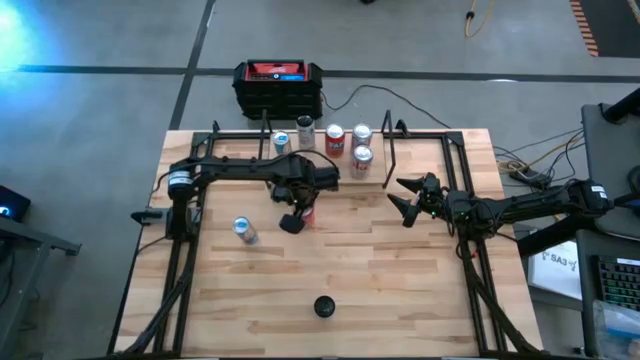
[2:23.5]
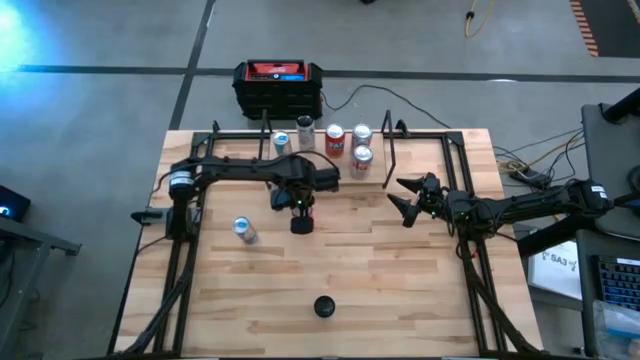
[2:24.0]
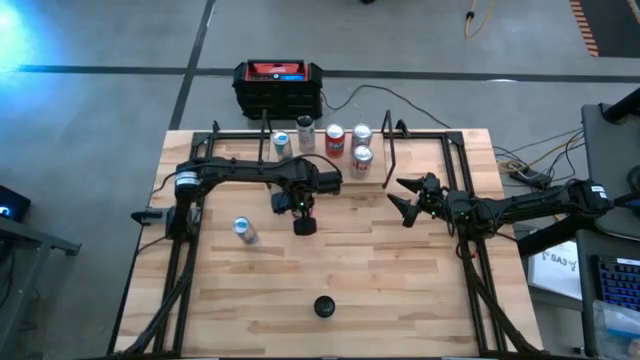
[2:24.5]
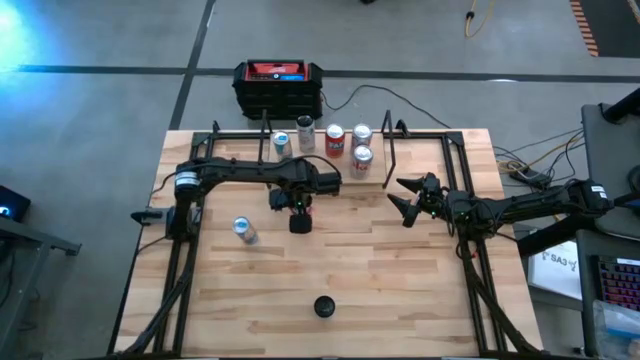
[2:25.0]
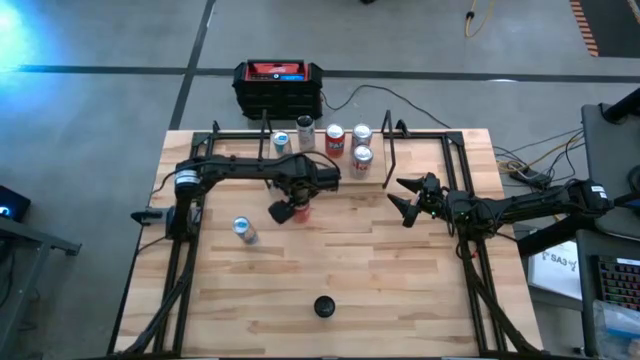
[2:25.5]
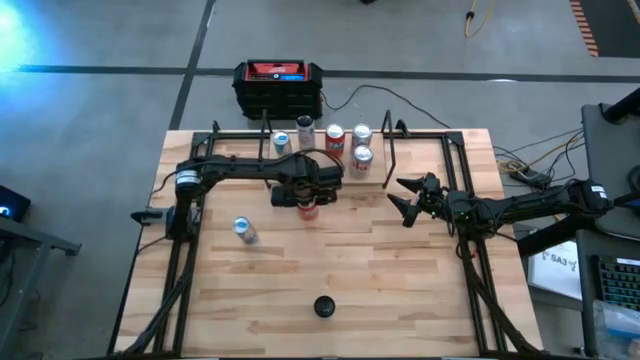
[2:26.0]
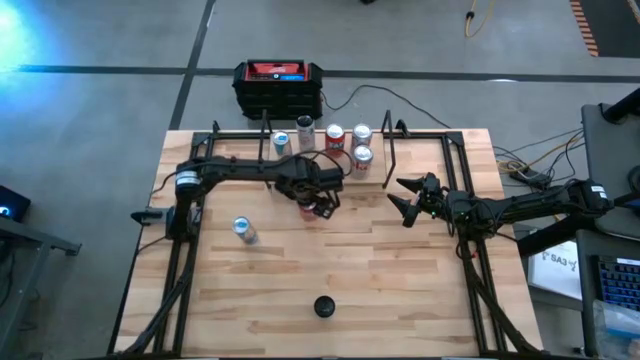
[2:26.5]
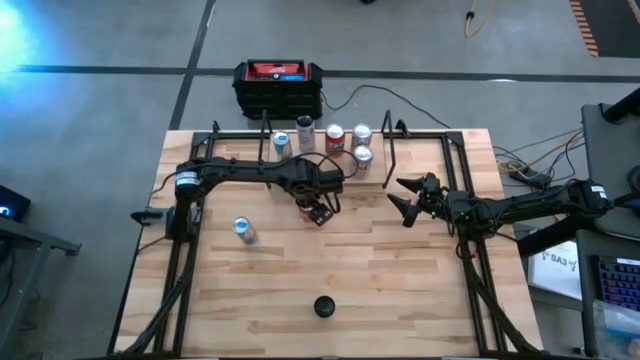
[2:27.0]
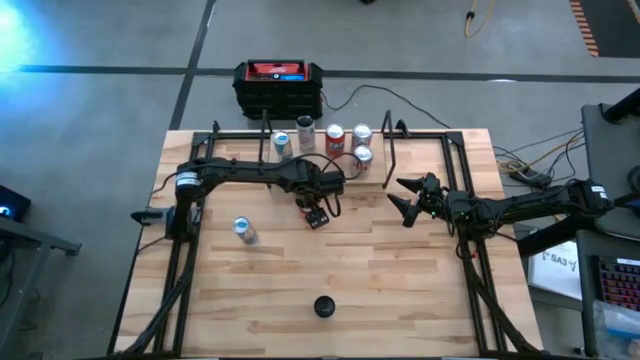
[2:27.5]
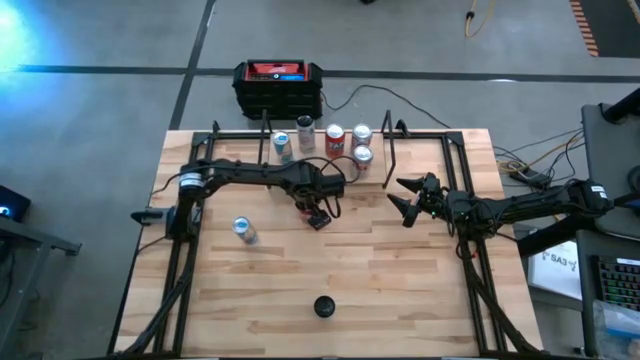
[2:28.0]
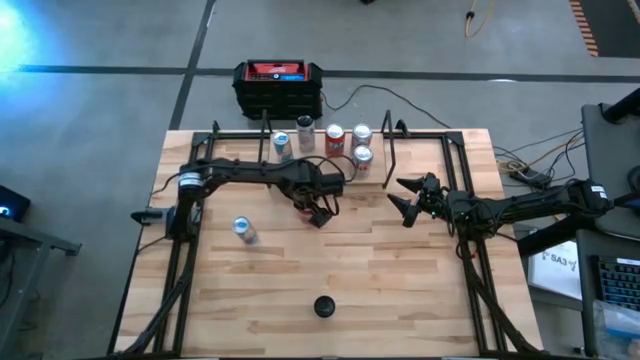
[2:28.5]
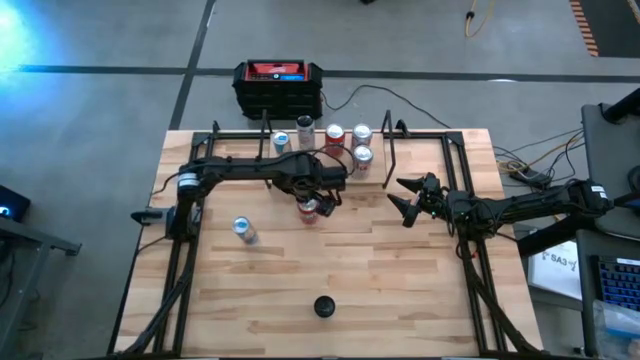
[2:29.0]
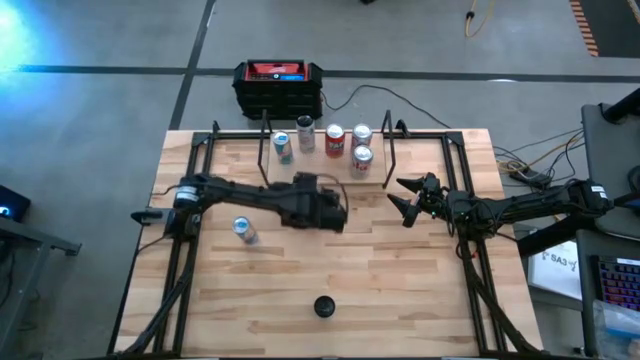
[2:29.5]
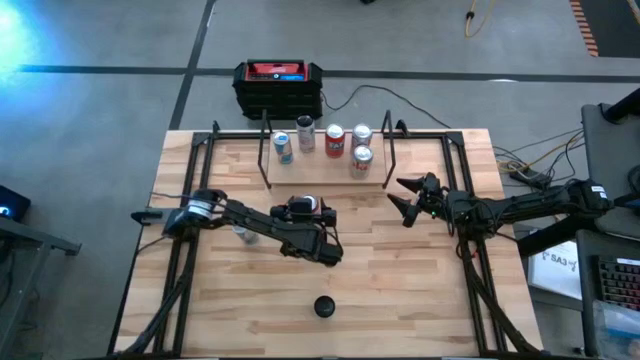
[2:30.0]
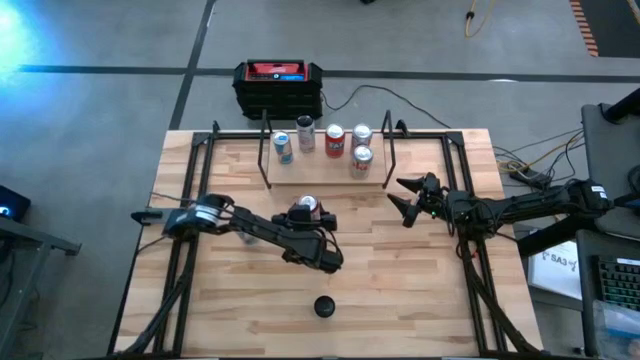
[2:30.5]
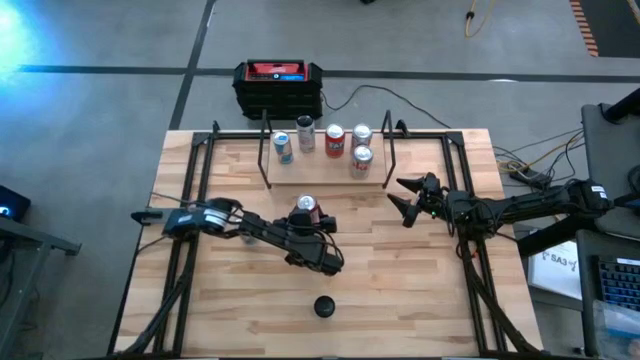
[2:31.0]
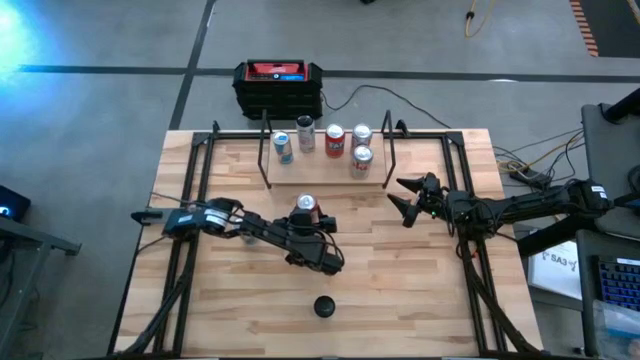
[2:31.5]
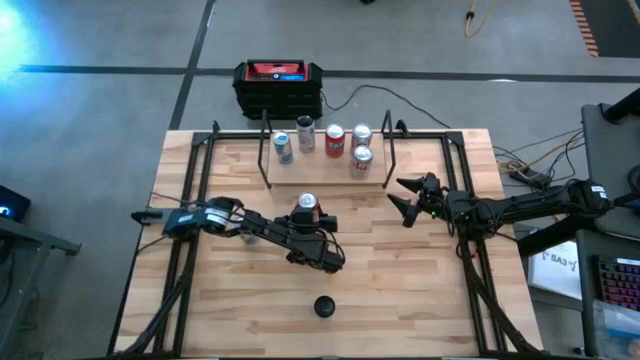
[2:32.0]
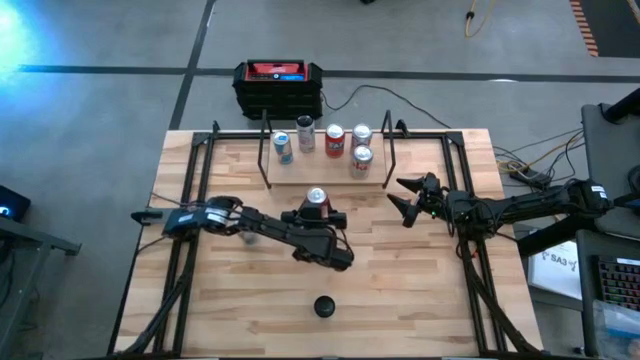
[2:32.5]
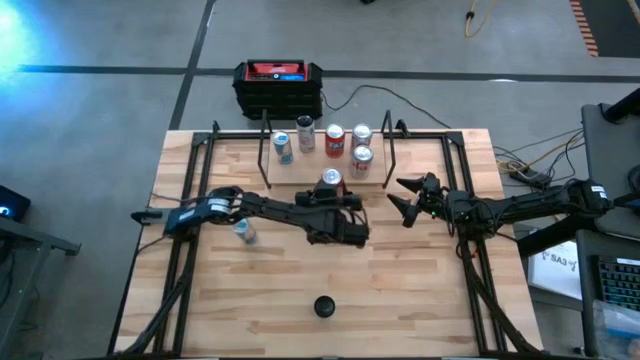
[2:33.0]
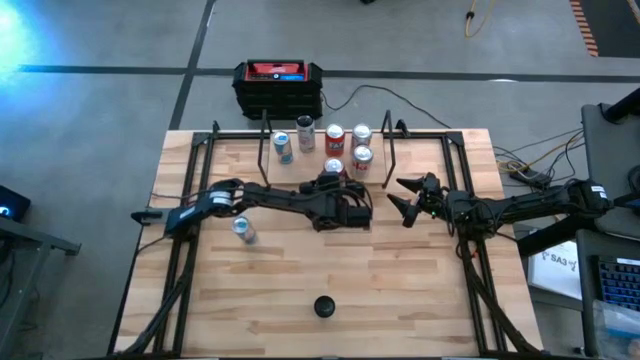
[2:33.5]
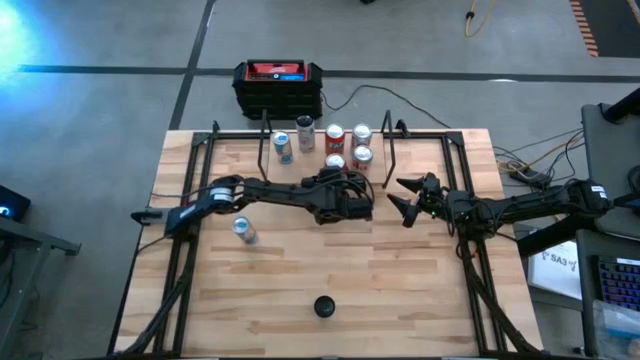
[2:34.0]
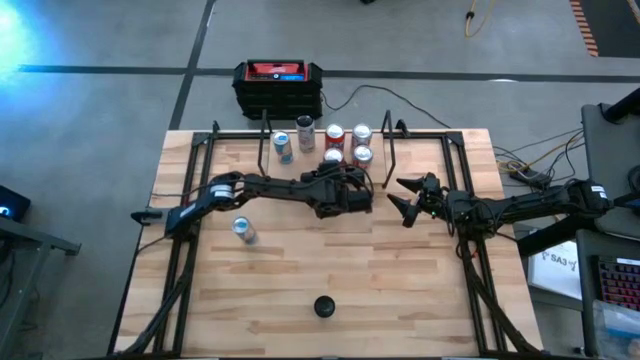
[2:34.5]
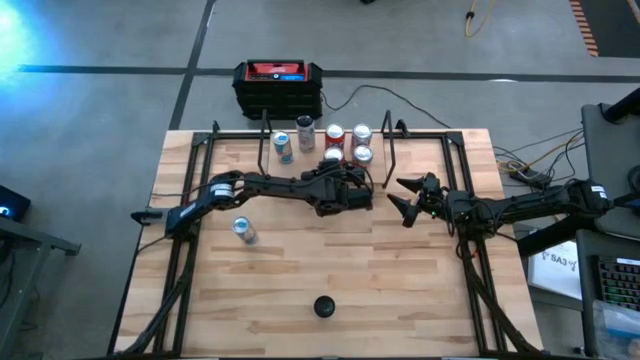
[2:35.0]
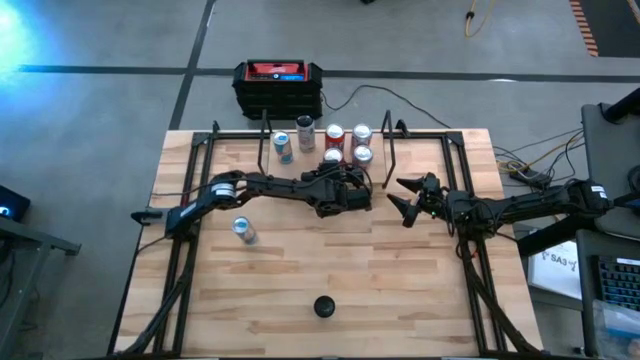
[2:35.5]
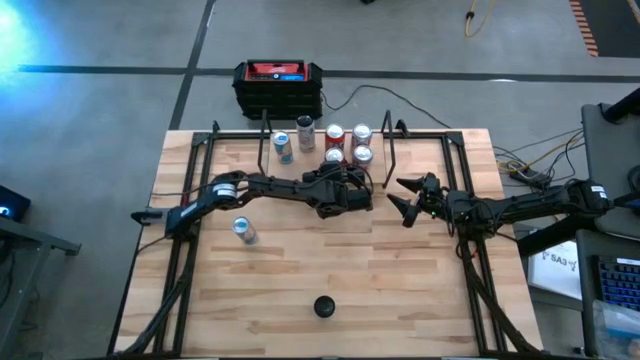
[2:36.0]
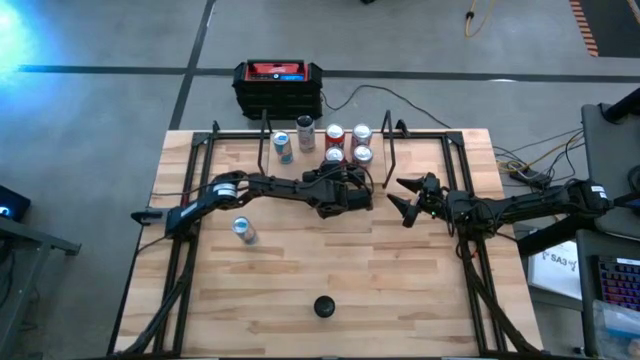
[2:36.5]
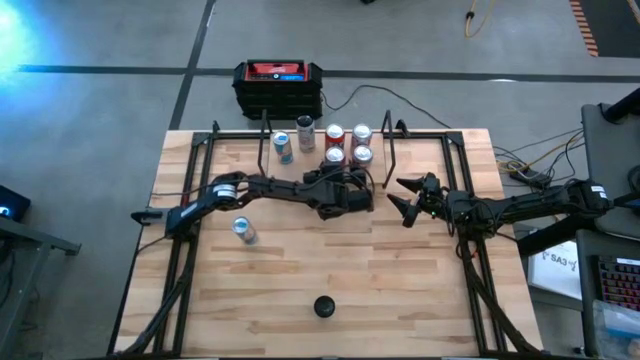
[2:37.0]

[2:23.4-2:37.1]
Task: Place canned beverage on shelf
Put the red soda can on the shelf aligned with the other red soda can

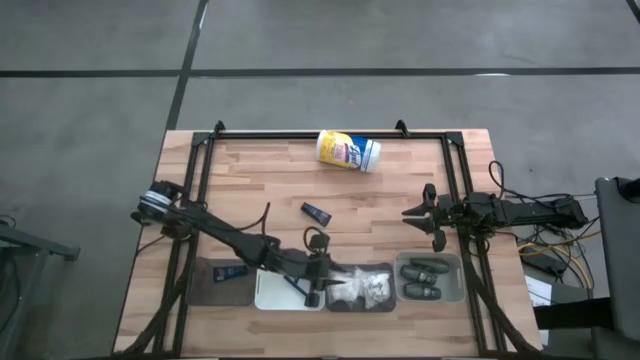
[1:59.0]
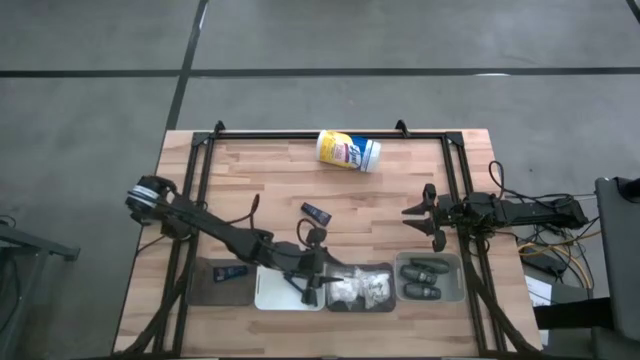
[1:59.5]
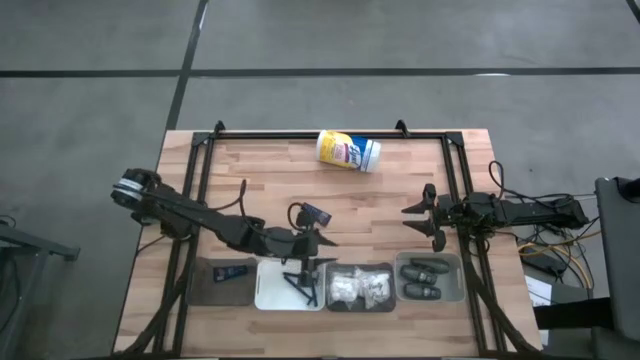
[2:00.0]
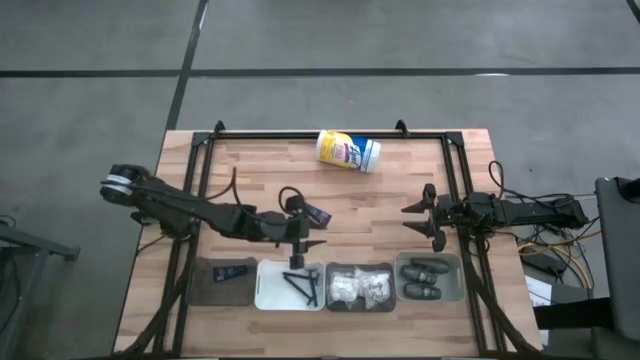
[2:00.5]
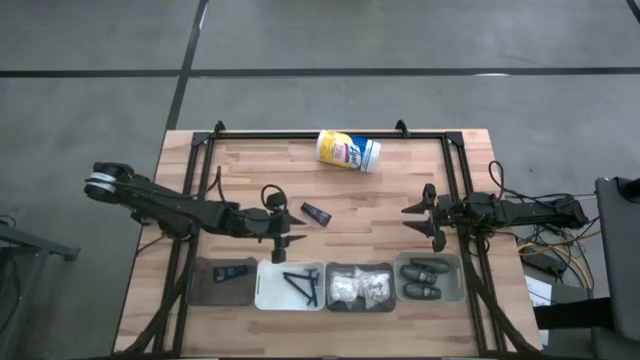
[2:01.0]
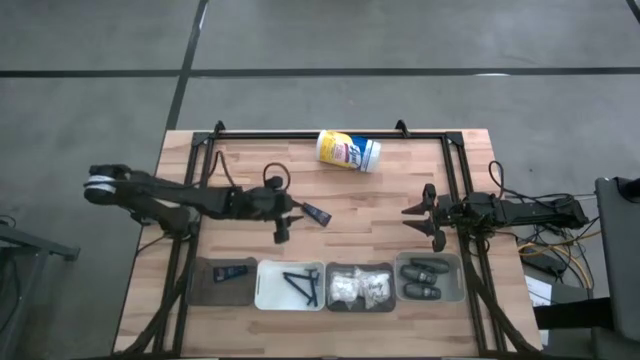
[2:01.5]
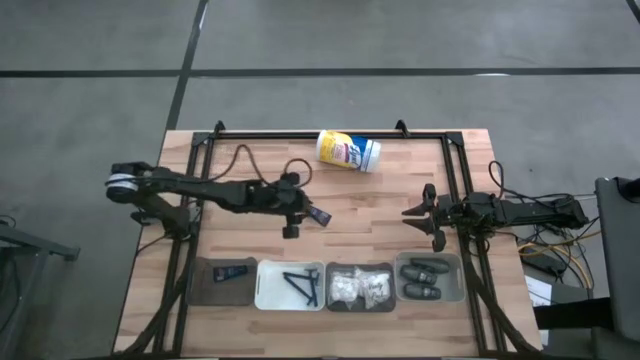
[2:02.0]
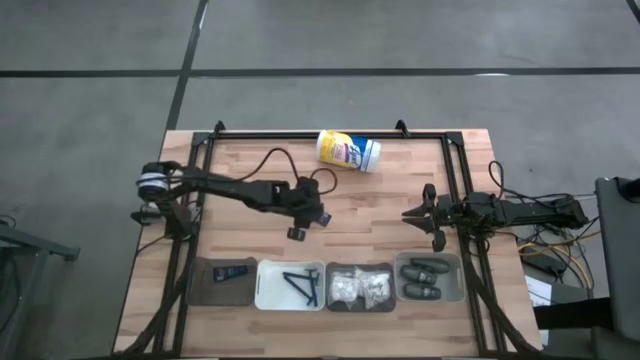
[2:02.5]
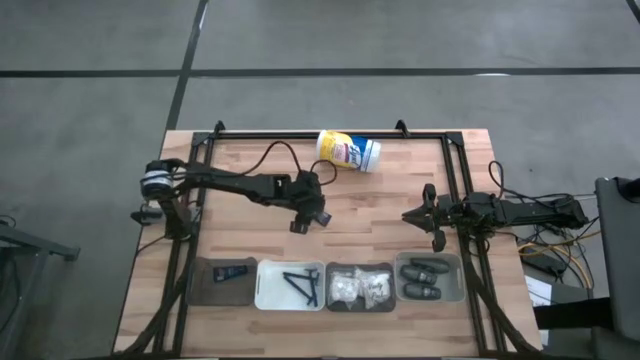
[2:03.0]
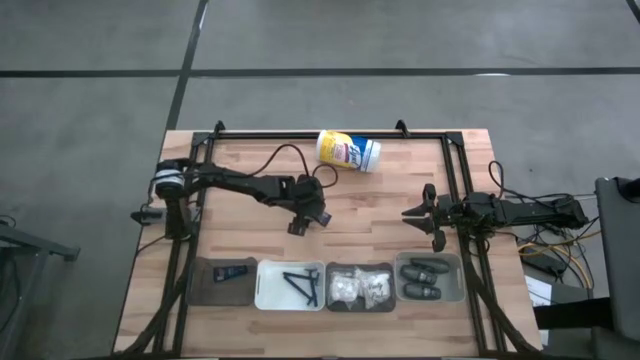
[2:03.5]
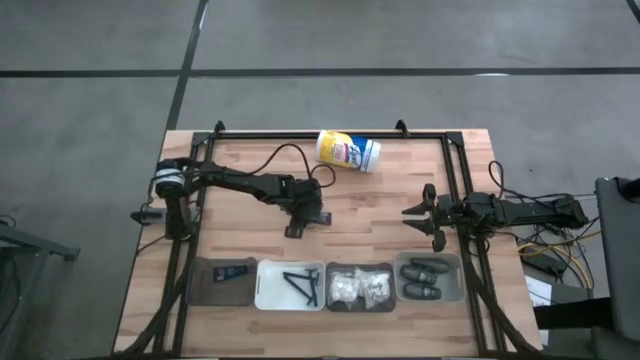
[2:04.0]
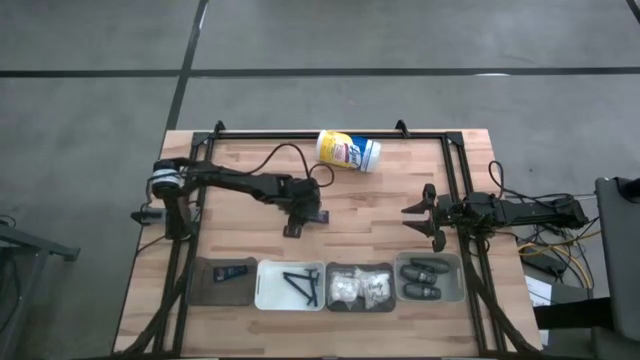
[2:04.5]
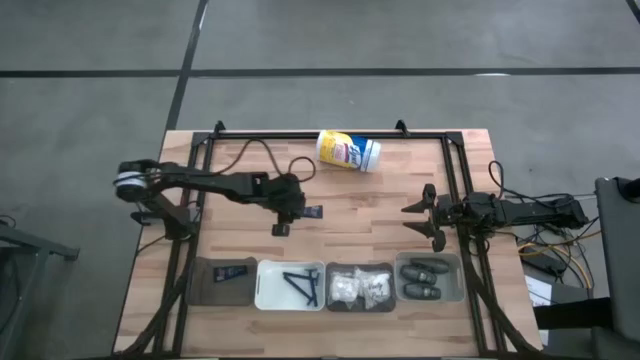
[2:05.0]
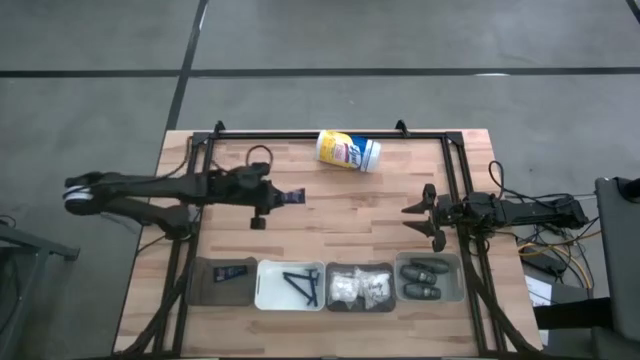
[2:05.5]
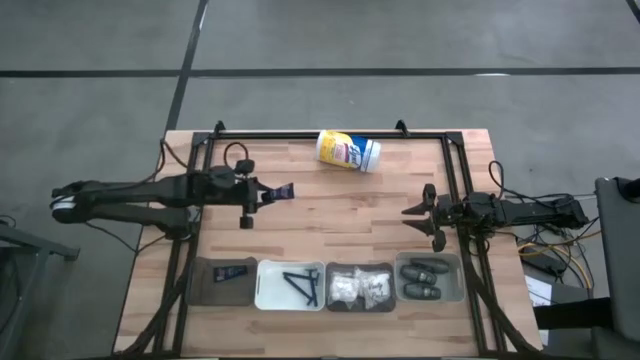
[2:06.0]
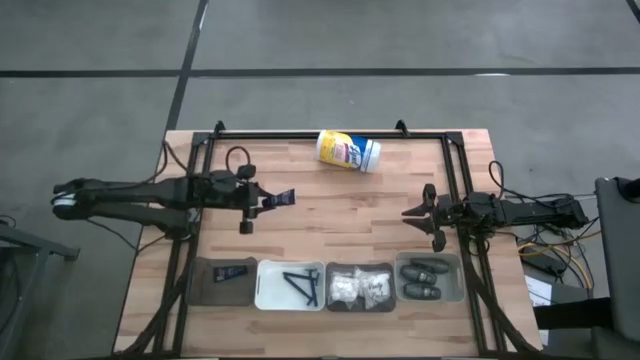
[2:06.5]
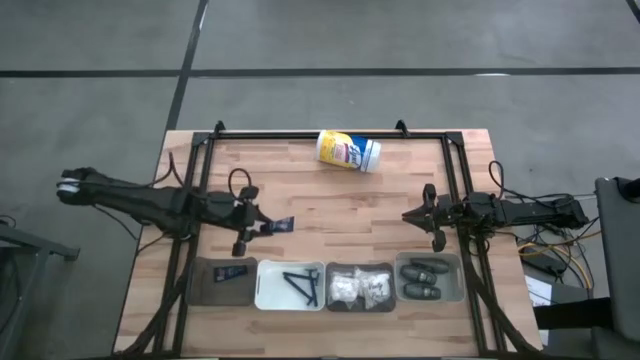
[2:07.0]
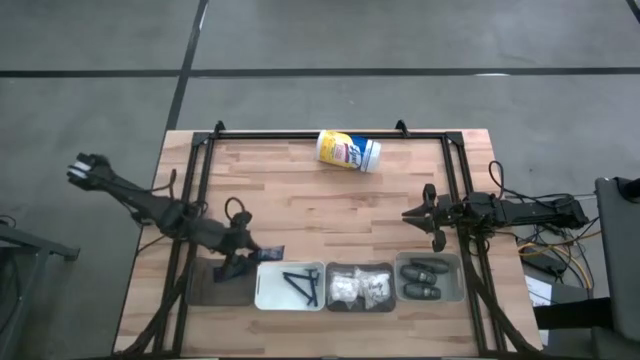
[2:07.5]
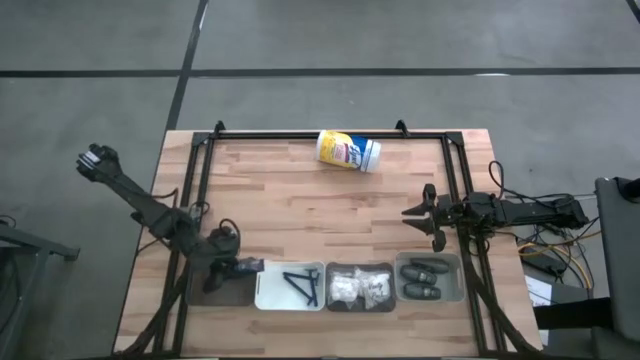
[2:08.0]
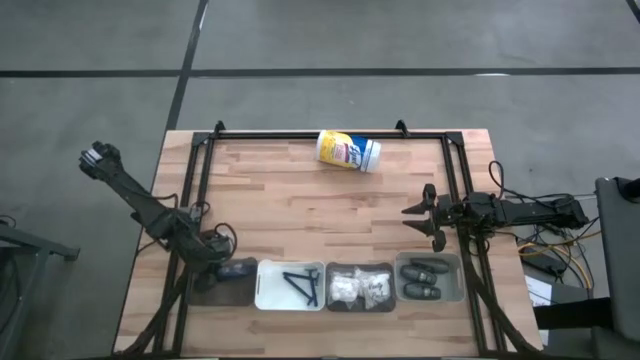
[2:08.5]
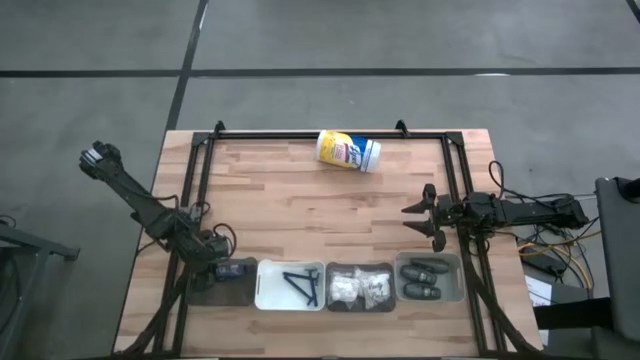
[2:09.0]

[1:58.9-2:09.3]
Task: Pick & Place Travel size toiletries
Put the dark blue shave cream into the left black bin
